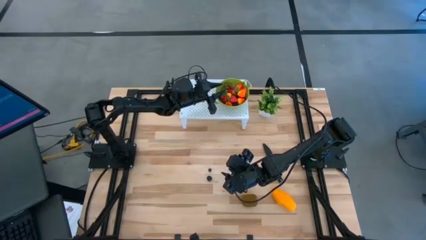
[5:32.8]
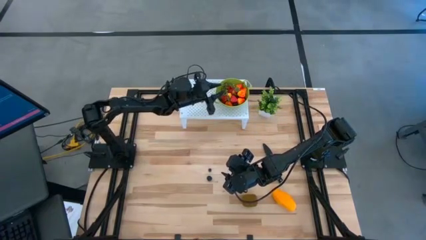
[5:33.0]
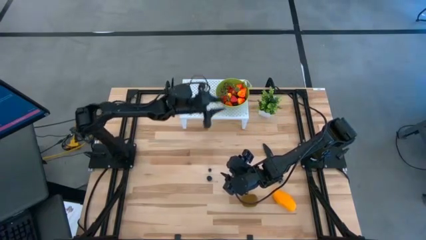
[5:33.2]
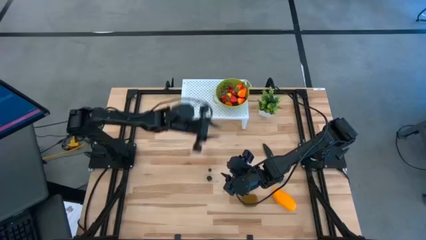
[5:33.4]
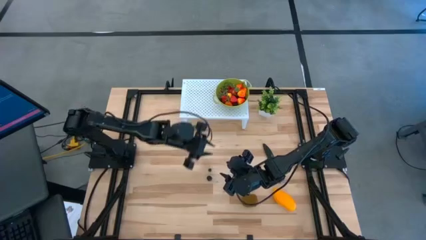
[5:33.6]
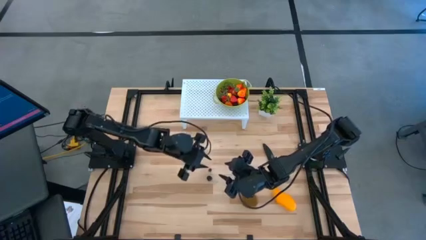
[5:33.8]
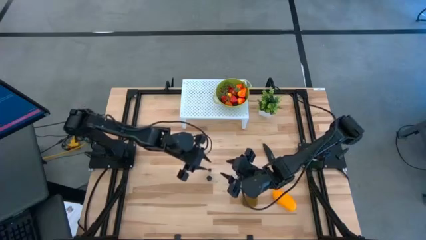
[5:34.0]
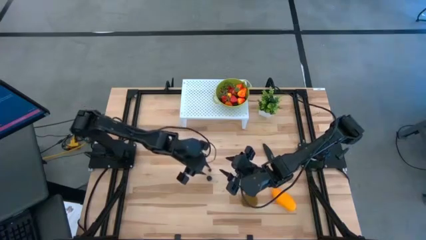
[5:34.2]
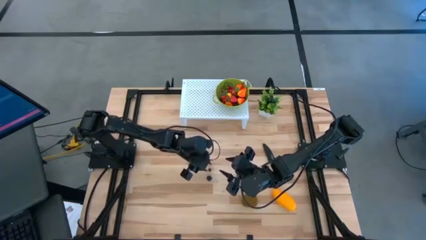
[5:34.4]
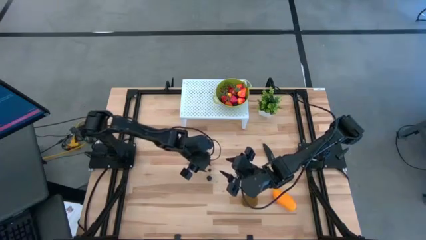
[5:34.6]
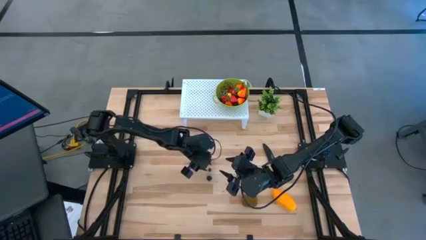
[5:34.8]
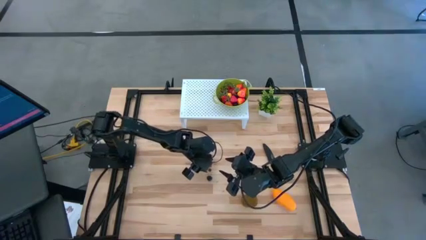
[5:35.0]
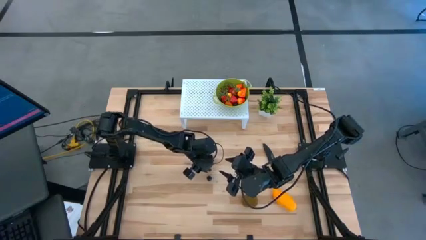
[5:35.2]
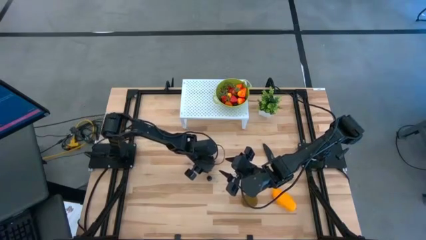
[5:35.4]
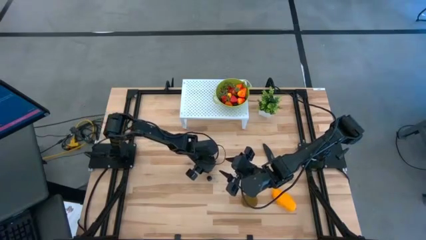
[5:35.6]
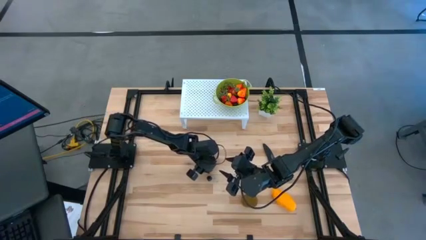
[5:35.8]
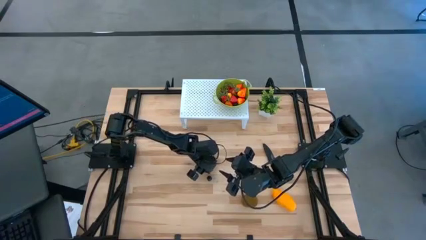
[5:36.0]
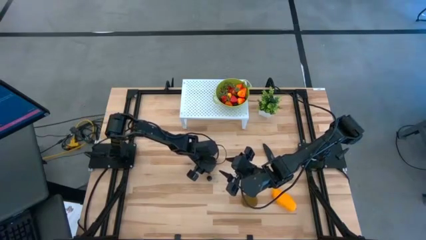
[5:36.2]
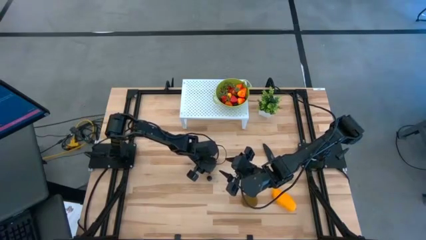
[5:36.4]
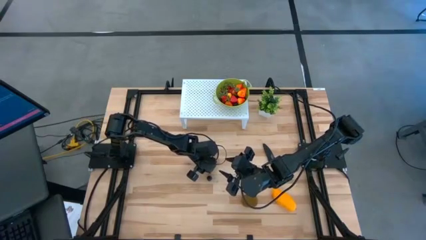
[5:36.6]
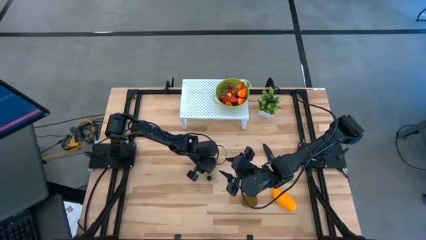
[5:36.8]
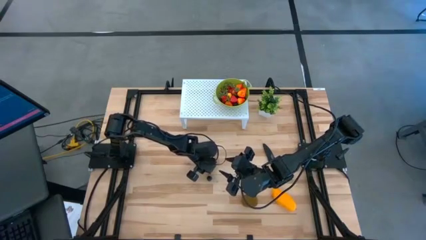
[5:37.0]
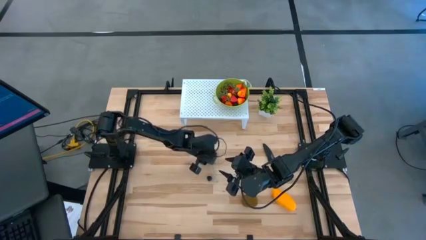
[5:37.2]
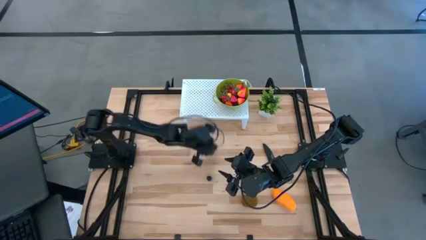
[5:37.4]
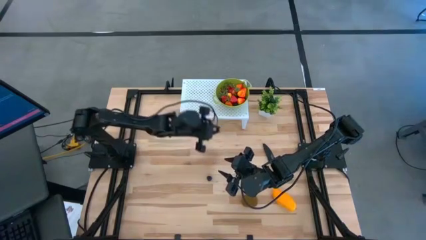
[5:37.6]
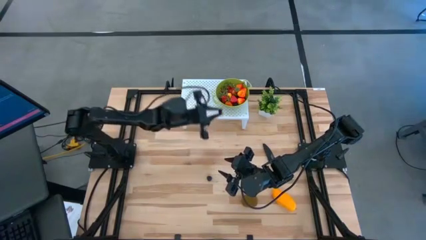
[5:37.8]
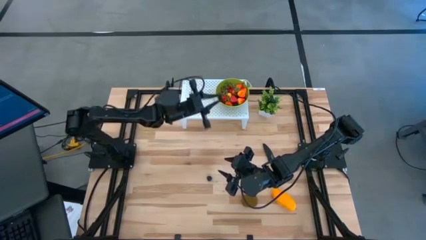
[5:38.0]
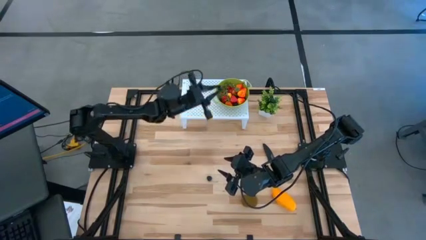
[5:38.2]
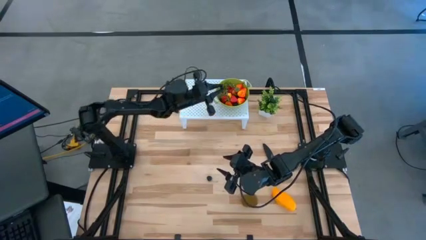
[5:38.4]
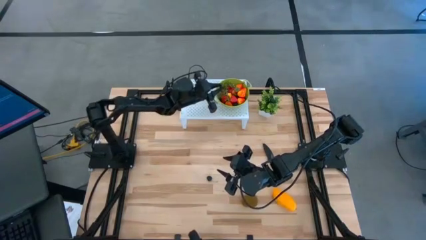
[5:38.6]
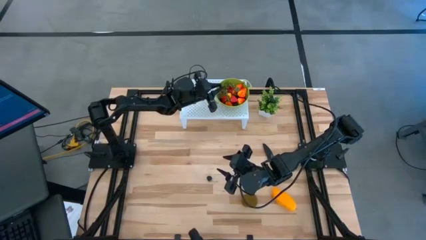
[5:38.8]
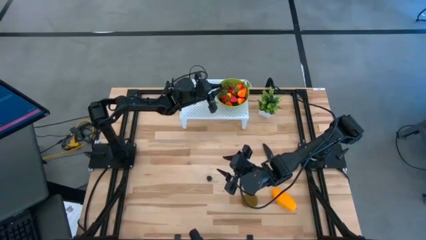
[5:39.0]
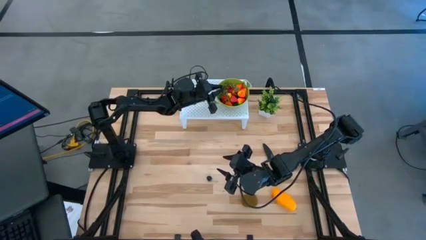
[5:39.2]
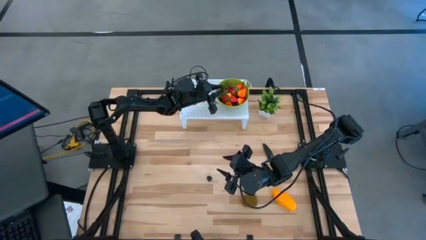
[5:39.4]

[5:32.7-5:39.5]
Task: Pick & Place Fruit
Put the black plum into the green strainer bowl

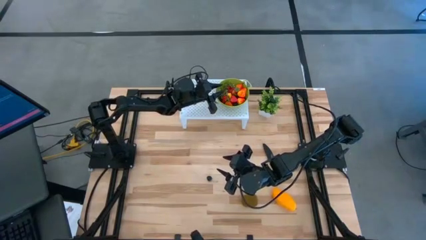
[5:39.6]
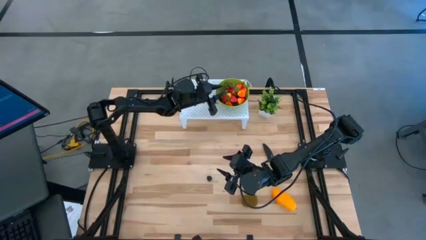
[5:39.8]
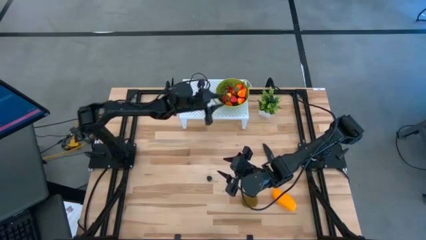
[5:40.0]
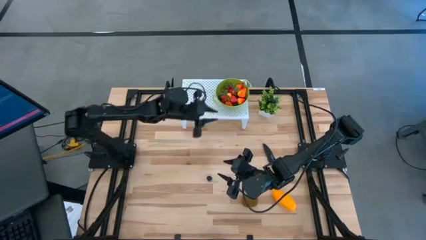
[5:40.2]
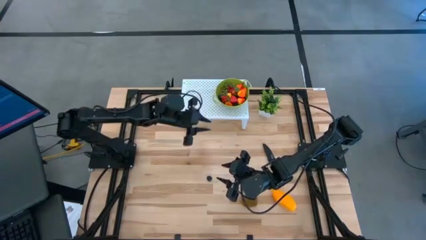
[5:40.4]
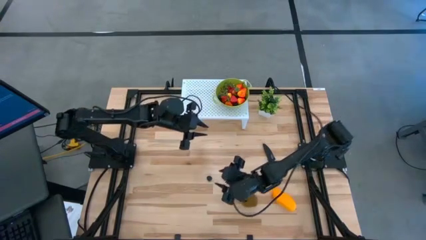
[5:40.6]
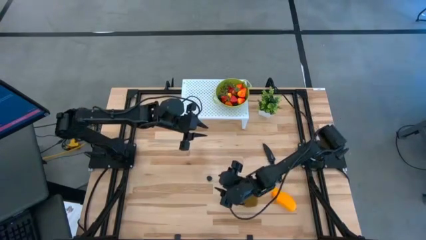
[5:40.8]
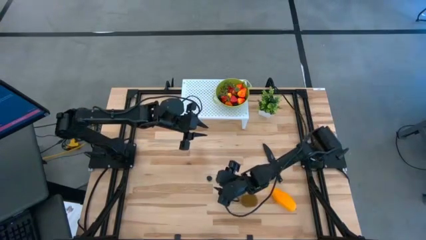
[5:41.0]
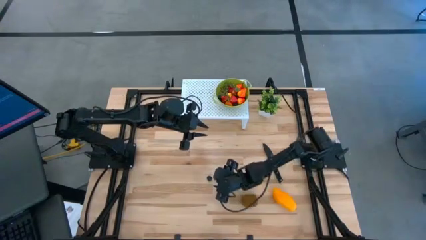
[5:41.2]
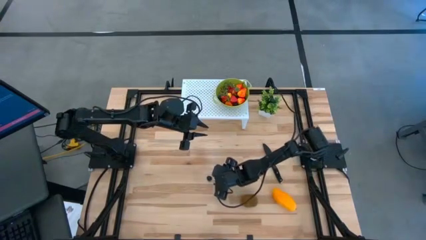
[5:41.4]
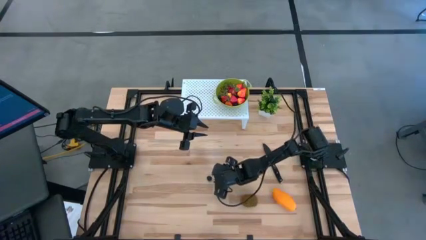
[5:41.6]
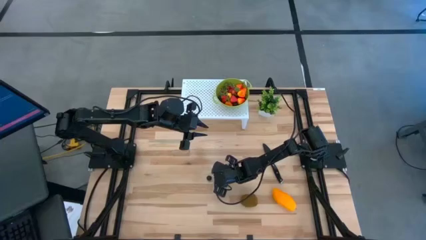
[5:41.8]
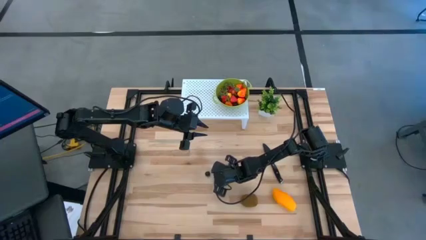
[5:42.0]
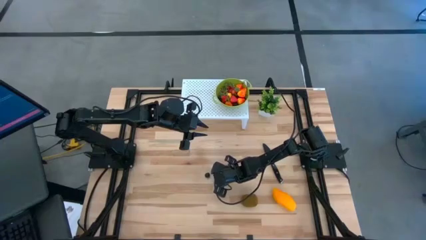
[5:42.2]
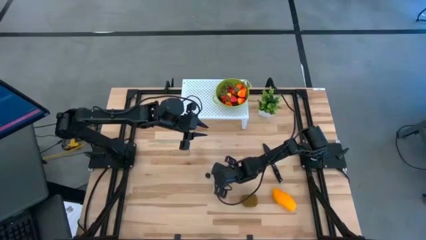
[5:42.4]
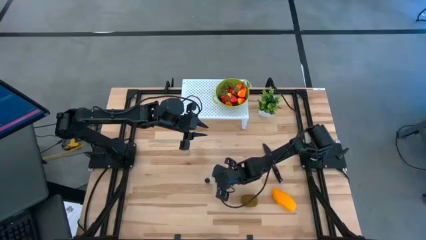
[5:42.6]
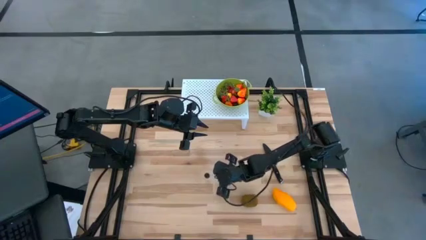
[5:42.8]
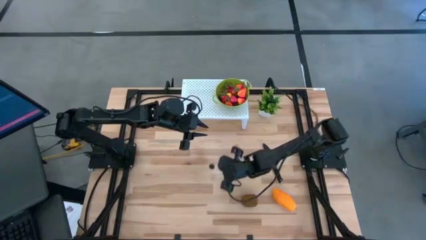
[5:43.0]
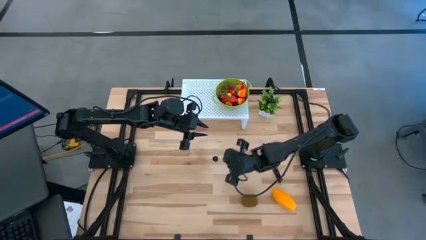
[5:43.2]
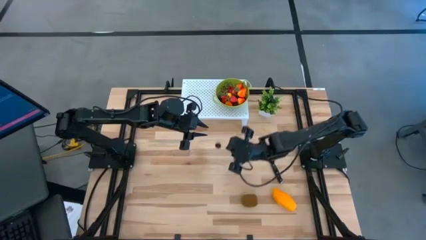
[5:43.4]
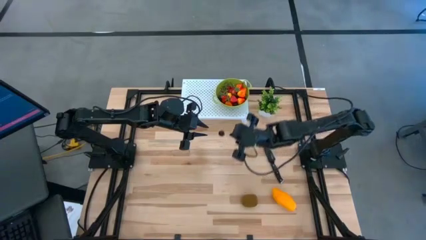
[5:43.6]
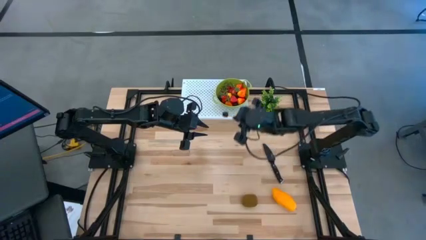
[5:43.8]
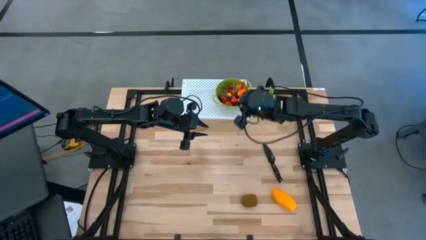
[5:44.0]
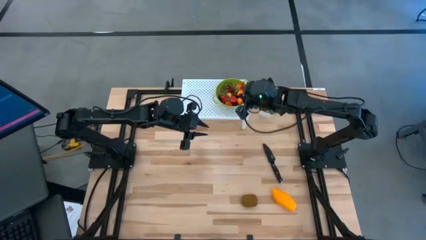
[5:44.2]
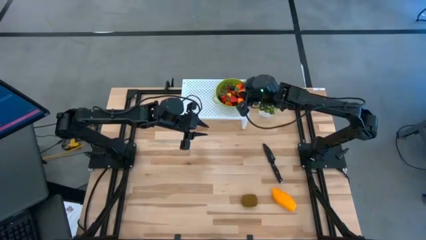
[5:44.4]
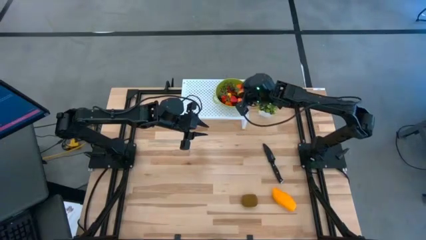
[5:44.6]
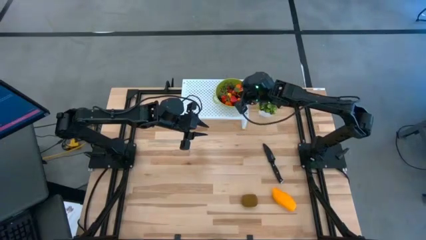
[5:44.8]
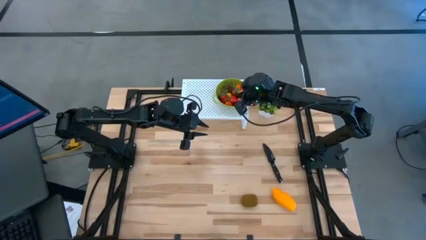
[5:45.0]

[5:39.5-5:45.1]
Put the black cherry into the green strainer bowl
